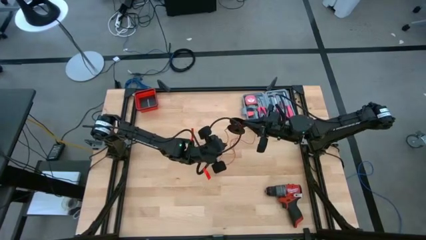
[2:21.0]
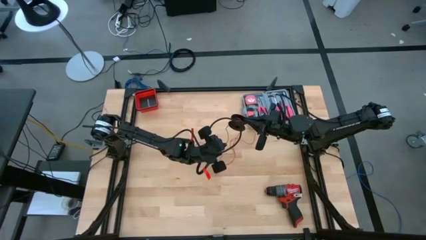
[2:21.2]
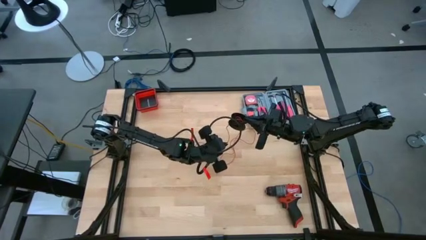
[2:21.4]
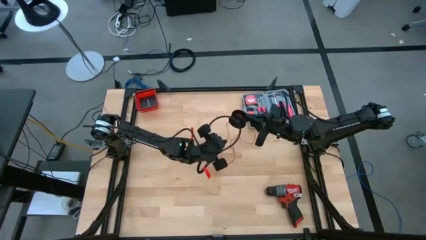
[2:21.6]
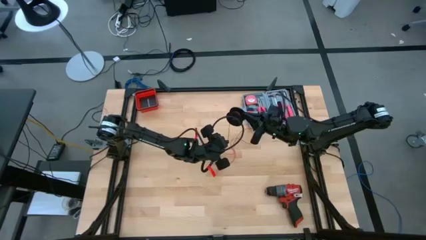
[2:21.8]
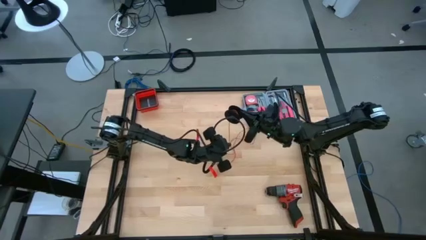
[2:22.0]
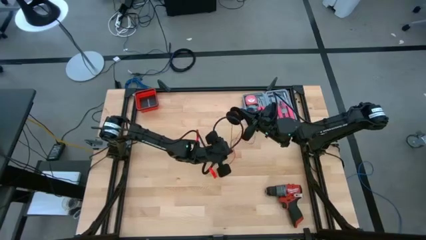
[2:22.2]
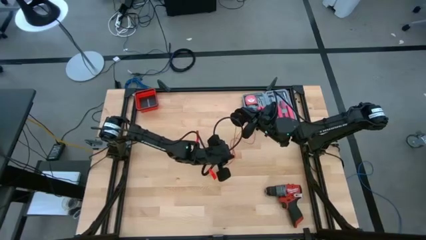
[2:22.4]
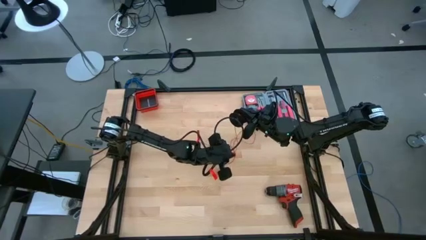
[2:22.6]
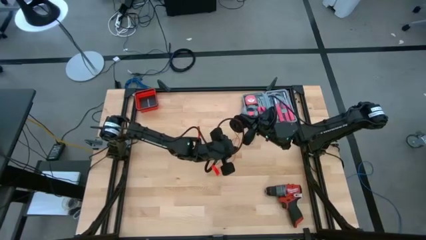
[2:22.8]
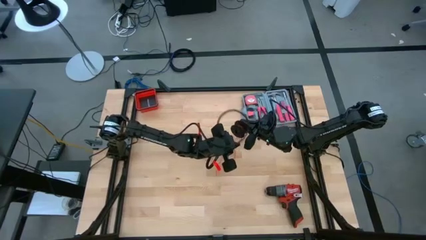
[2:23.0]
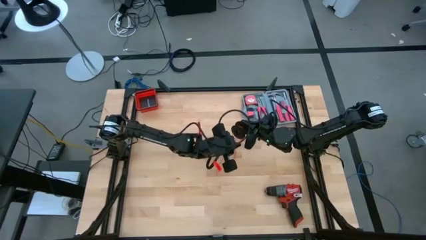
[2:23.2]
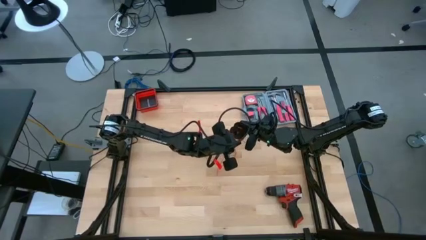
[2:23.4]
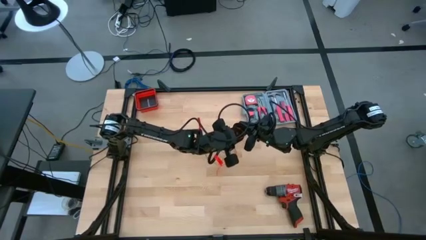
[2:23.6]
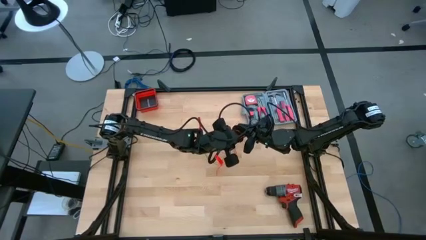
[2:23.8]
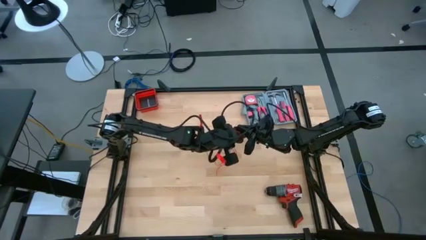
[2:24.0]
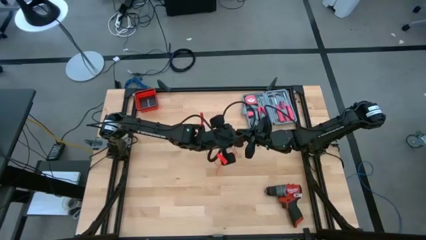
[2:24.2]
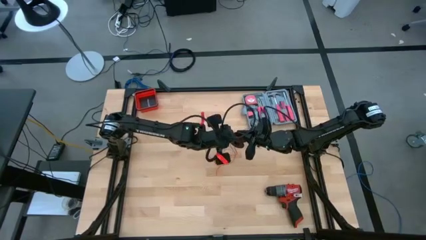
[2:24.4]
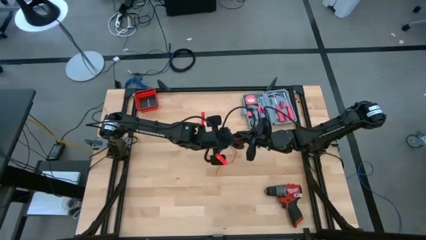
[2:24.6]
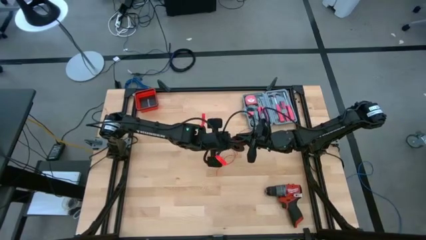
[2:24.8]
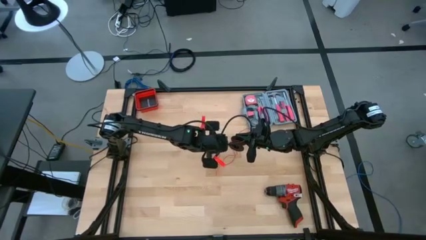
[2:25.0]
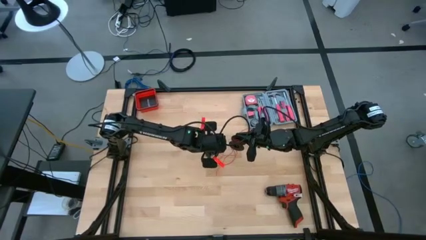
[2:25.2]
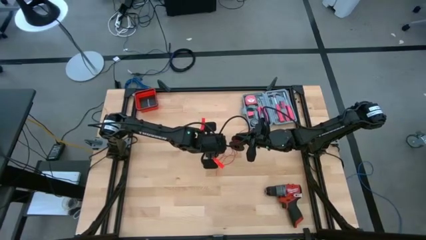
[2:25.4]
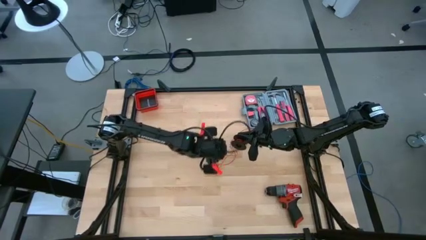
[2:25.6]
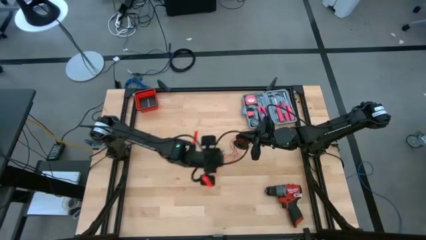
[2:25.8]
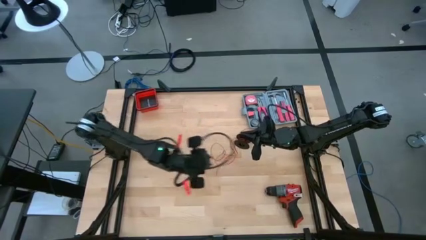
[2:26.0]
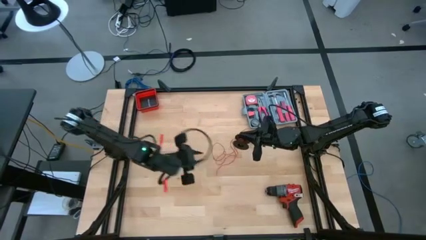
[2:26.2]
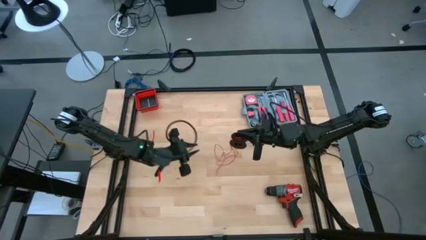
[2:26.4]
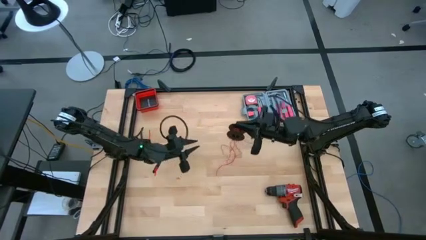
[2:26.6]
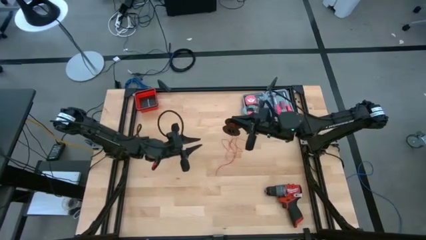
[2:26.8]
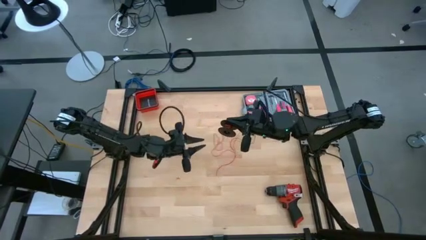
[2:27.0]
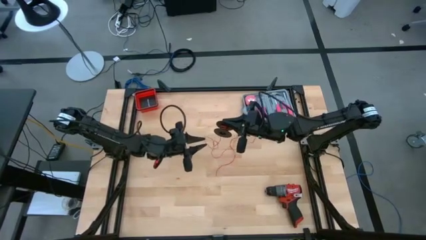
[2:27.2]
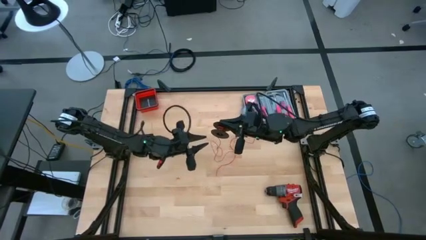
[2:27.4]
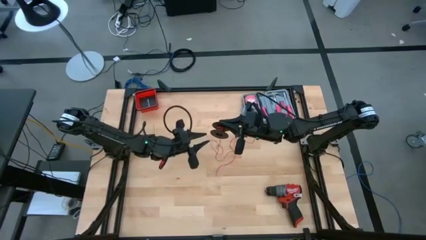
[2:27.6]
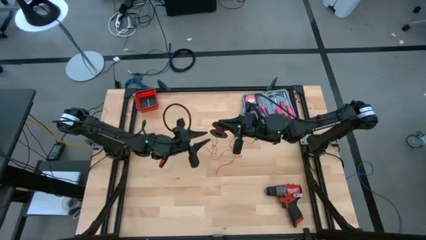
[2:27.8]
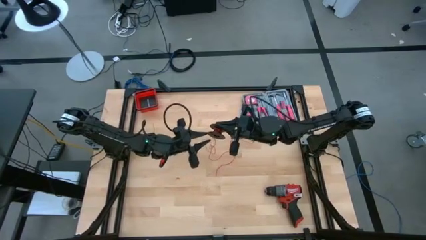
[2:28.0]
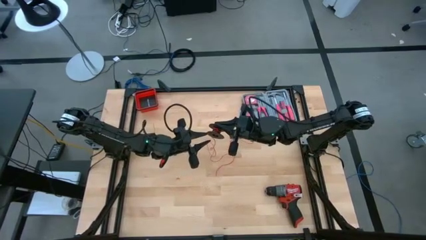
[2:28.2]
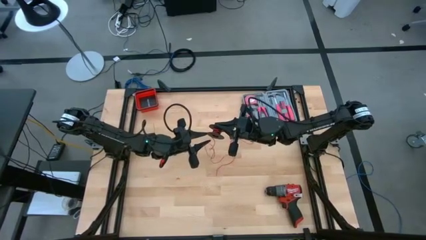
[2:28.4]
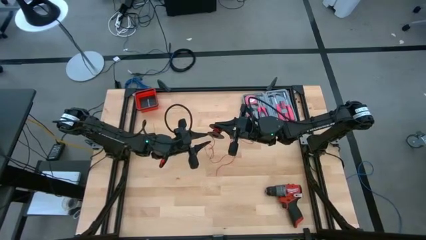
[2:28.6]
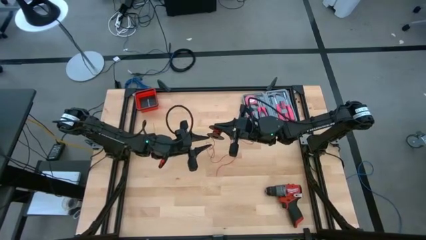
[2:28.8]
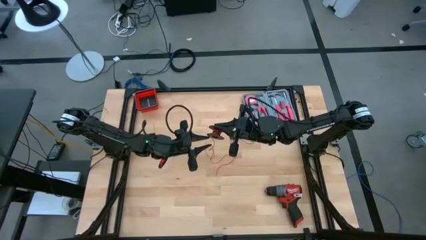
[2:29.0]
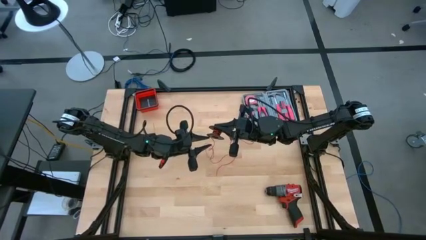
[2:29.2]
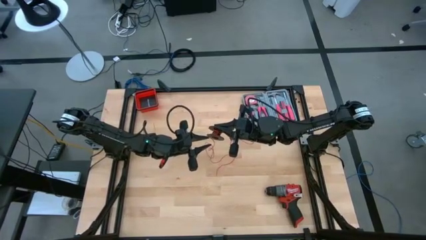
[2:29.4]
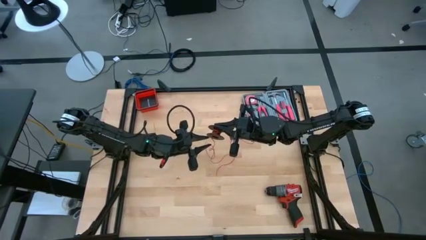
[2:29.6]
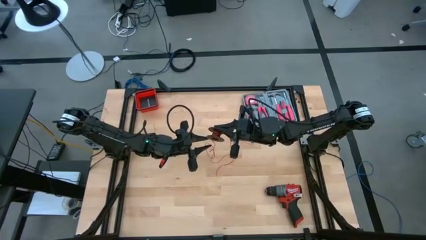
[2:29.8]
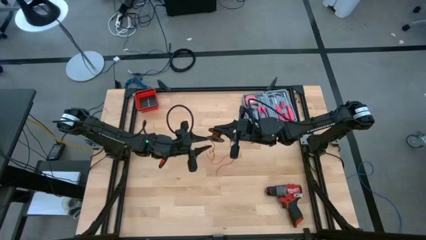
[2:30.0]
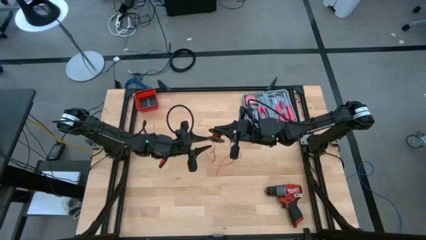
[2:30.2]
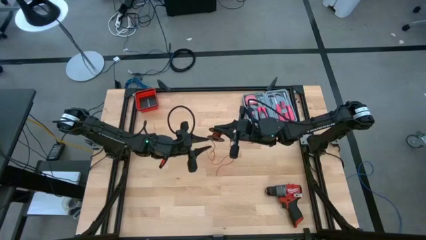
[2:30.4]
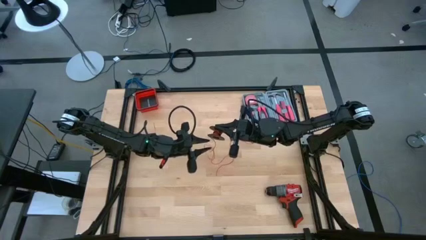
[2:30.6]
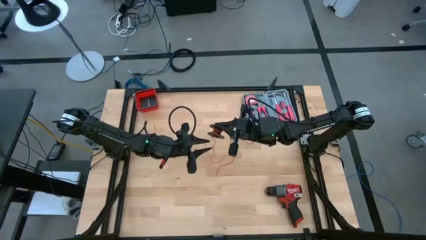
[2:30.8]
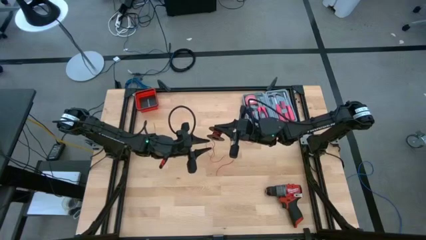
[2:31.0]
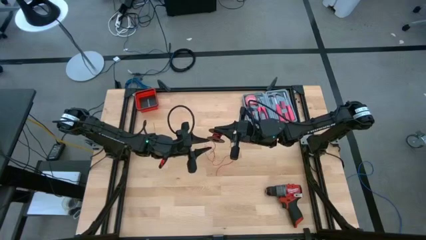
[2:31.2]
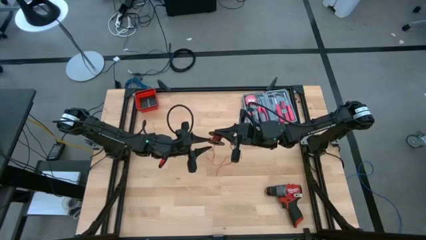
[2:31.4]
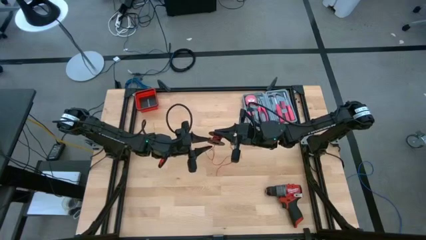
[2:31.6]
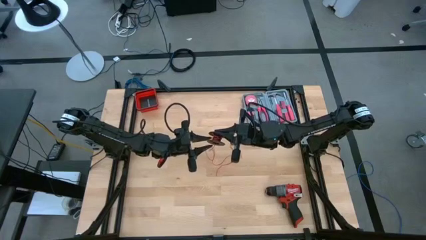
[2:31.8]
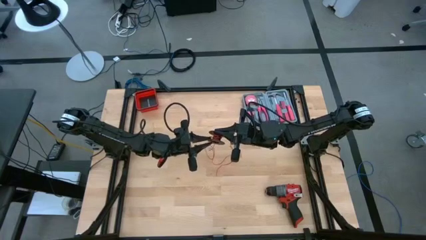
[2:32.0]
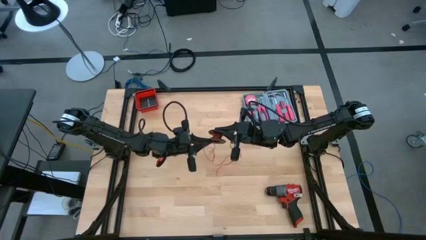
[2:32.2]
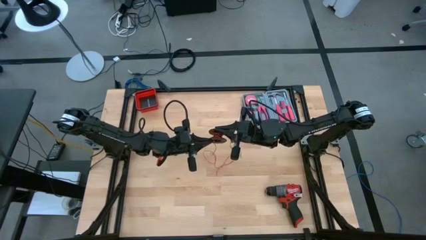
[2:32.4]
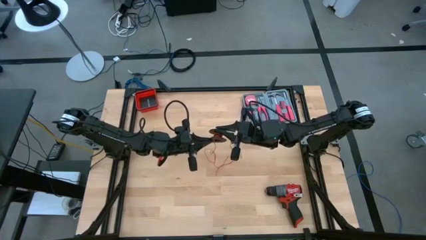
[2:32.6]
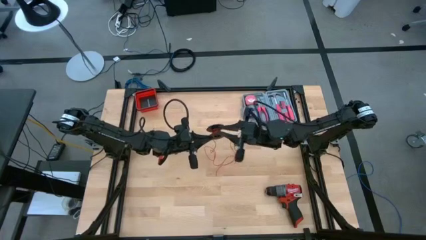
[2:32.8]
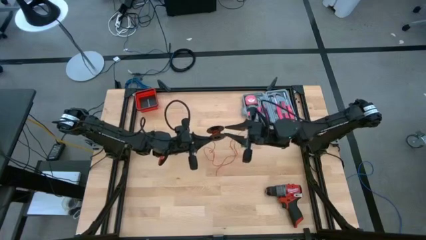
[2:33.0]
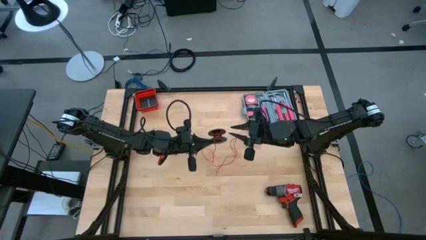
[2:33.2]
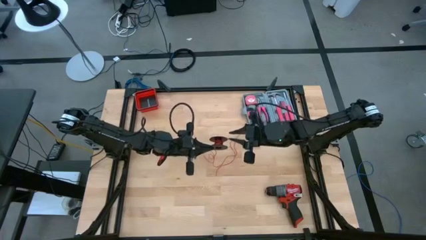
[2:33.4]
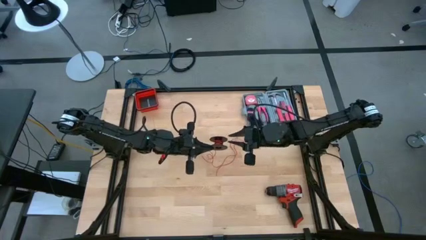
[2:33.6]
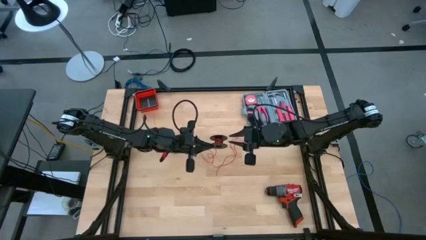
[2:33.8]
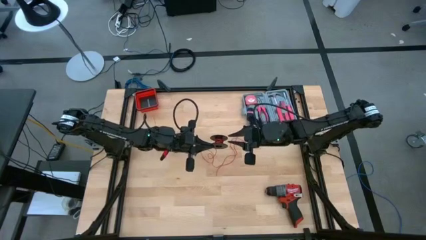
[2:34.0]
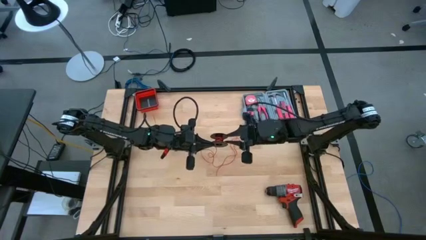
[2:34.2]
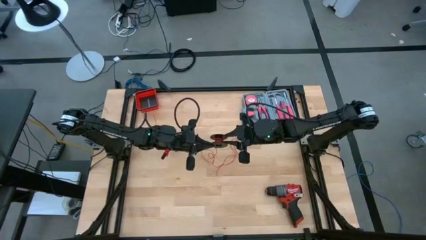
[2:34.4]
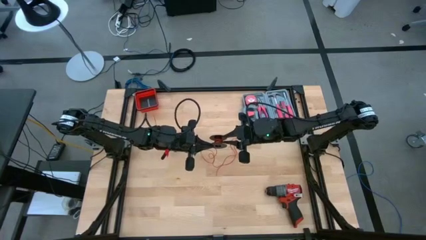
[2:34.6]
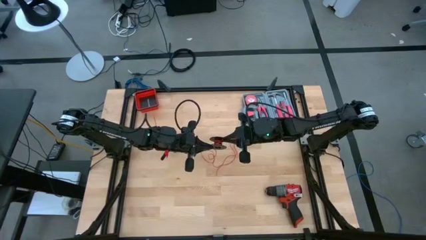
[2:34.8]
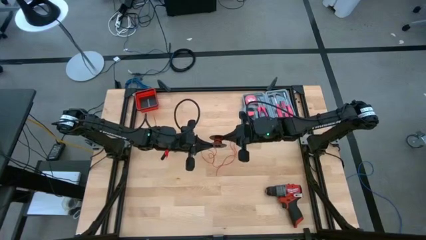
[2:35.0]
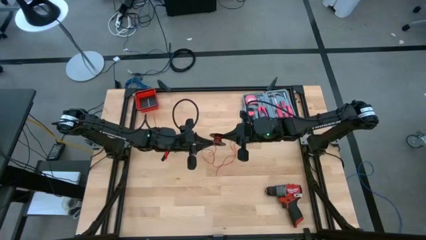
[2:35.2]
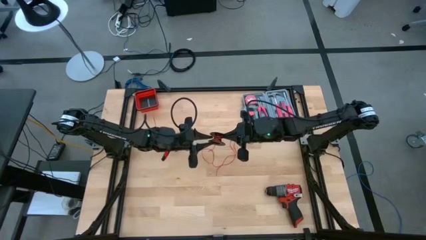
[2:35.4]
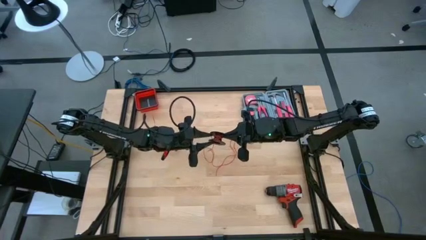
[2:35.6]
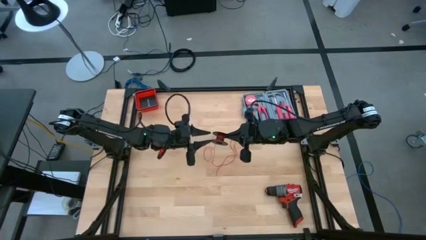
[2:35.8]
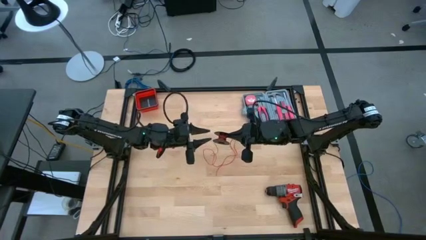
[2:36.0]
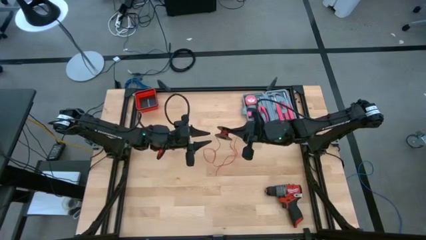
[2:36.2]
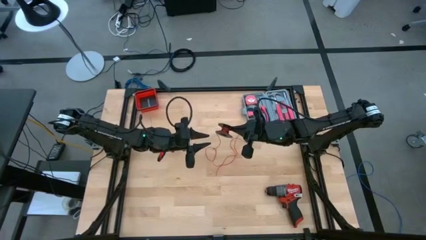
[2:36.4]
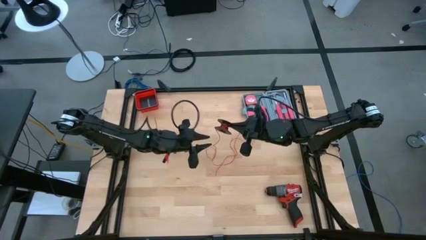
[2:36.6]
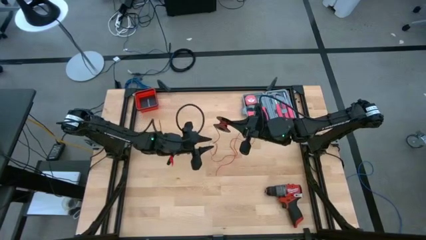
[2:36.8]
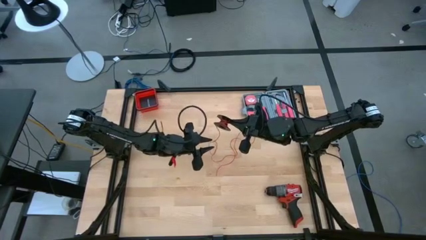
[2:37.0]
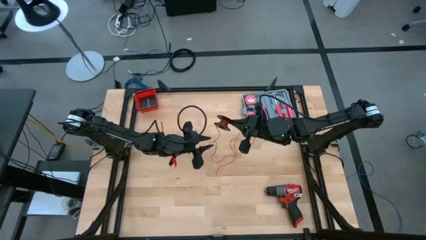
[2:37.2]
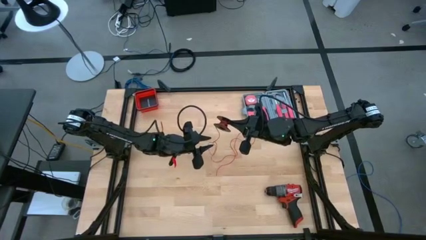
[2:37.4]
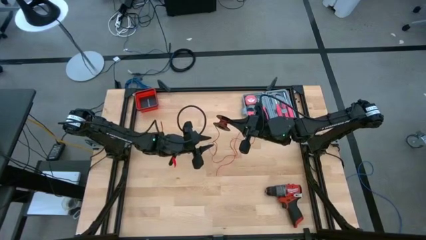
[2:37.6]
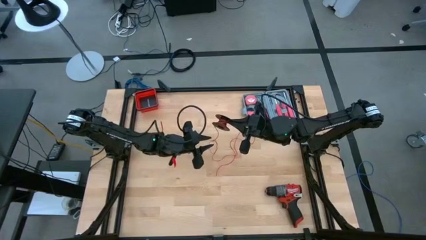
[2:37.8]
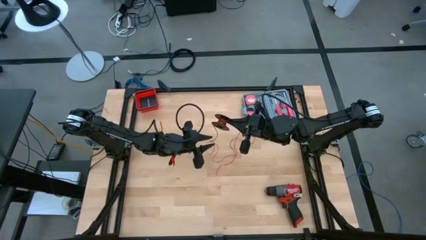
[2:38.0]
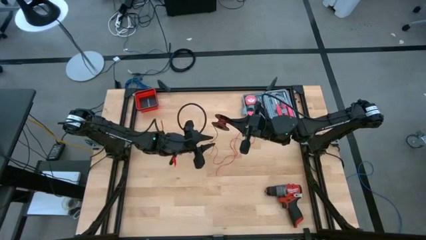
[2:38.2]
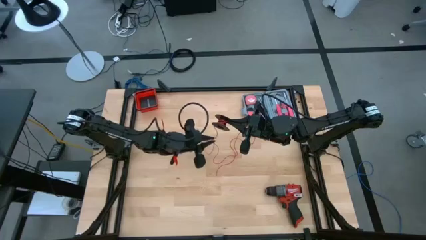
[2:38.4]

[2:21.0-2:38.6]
Task: Coil cords
Coil the red wire onto the black spool
